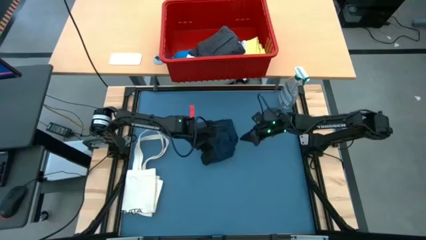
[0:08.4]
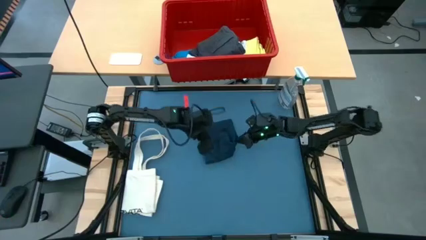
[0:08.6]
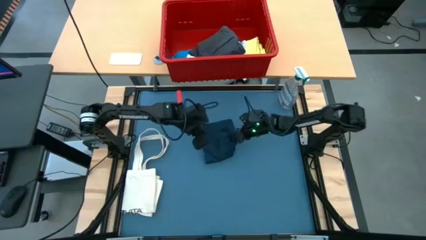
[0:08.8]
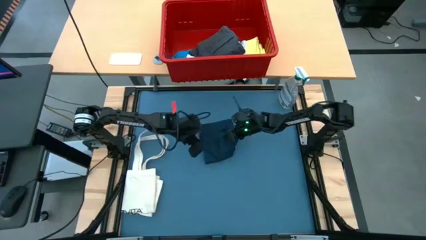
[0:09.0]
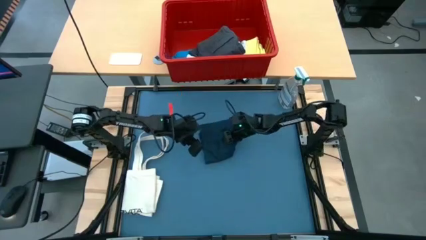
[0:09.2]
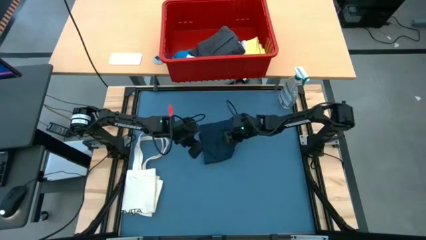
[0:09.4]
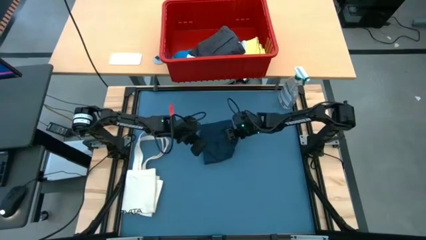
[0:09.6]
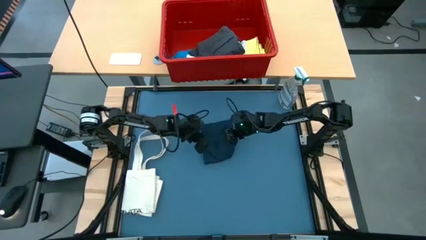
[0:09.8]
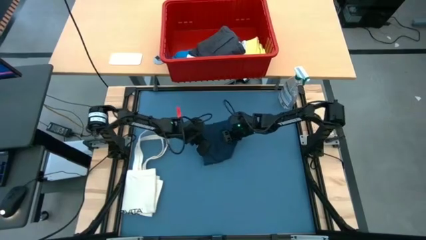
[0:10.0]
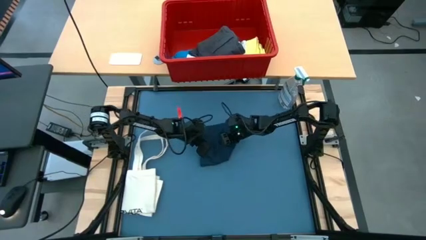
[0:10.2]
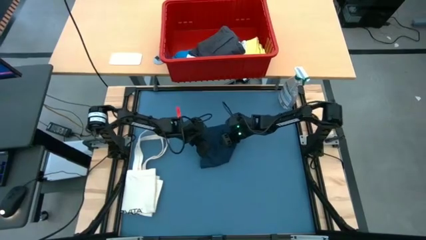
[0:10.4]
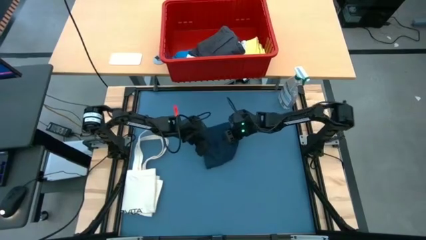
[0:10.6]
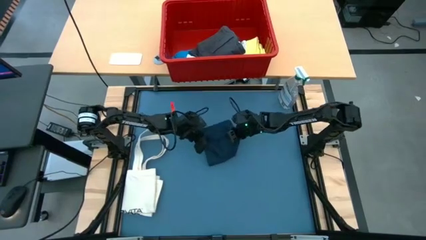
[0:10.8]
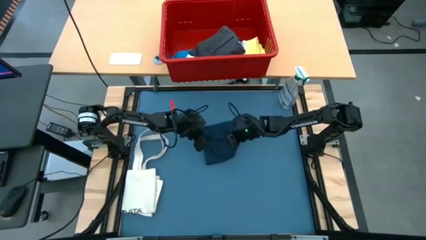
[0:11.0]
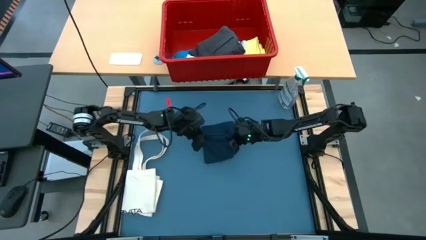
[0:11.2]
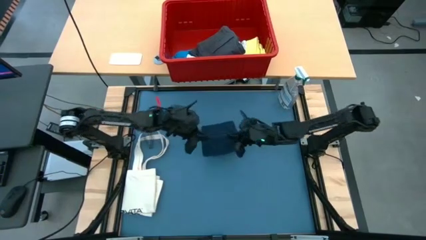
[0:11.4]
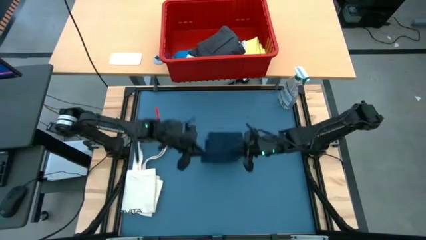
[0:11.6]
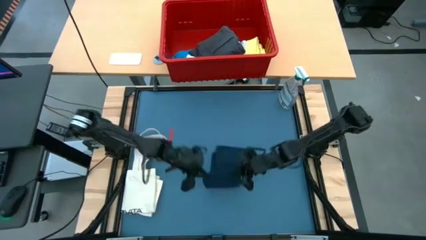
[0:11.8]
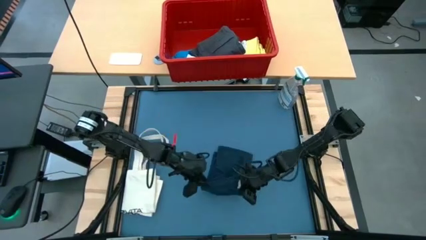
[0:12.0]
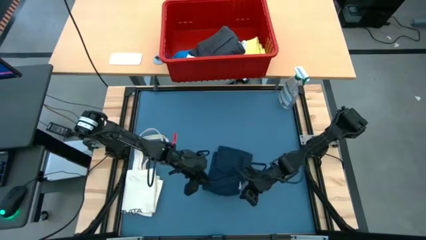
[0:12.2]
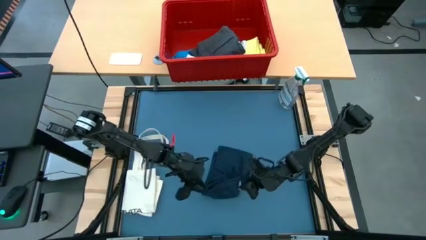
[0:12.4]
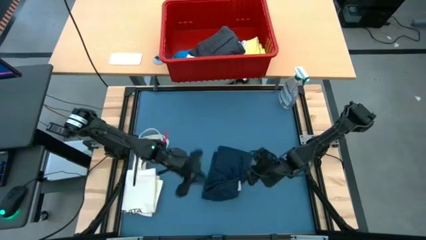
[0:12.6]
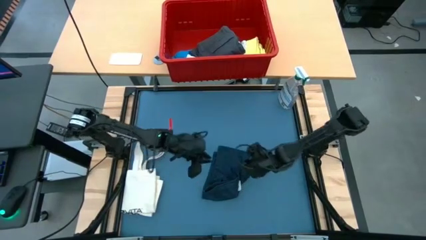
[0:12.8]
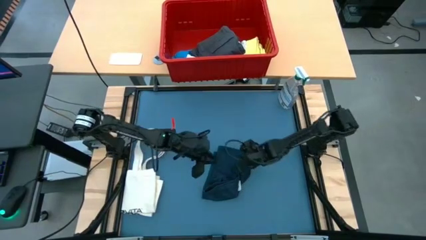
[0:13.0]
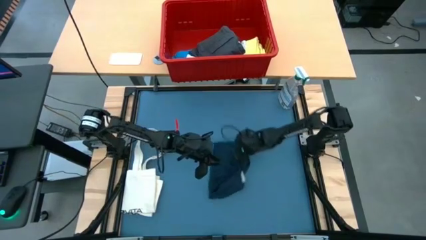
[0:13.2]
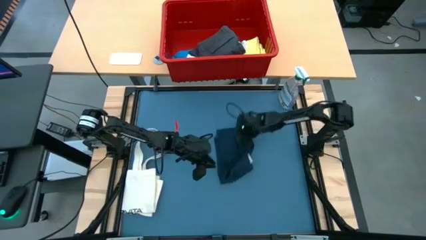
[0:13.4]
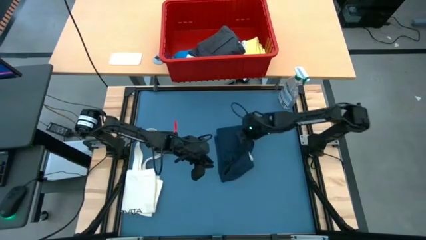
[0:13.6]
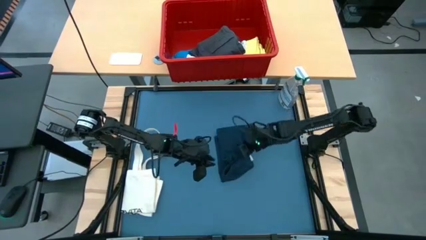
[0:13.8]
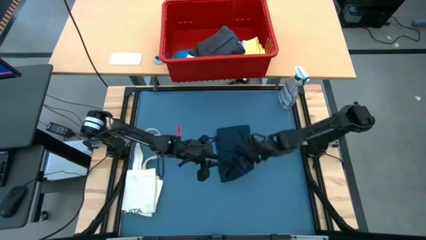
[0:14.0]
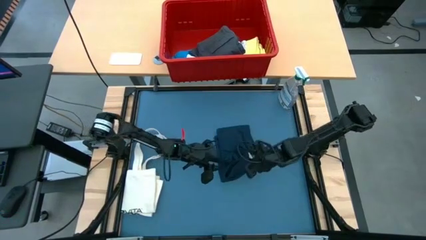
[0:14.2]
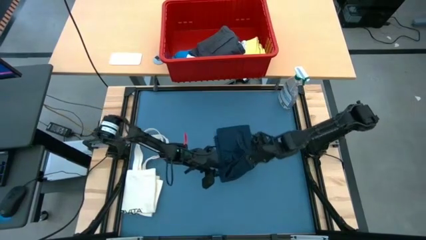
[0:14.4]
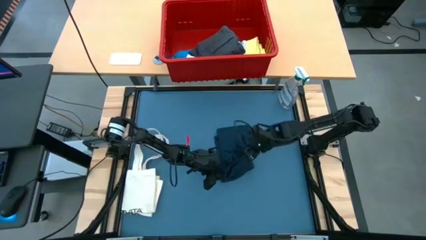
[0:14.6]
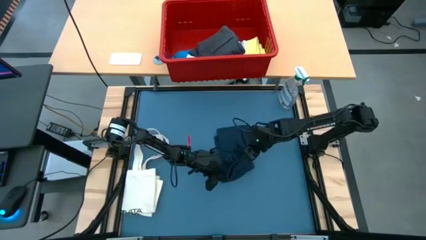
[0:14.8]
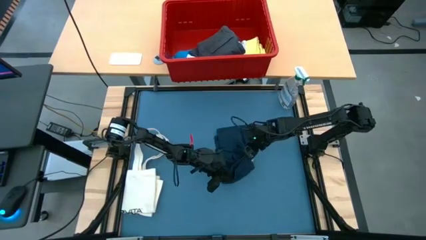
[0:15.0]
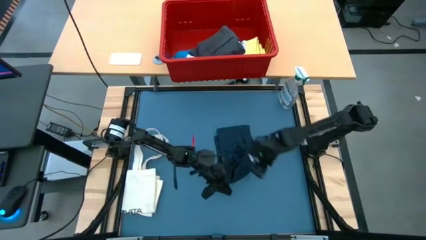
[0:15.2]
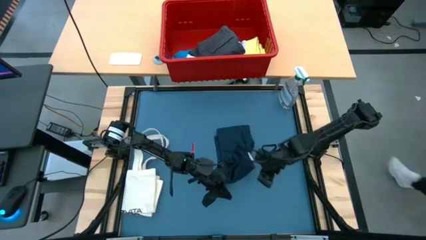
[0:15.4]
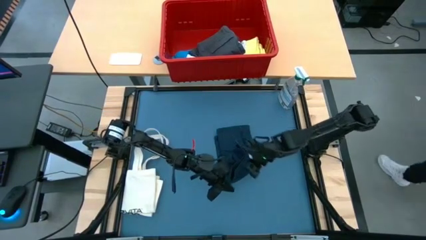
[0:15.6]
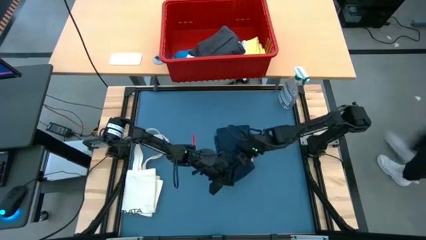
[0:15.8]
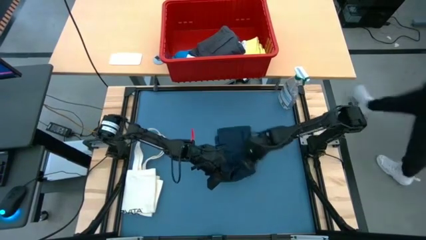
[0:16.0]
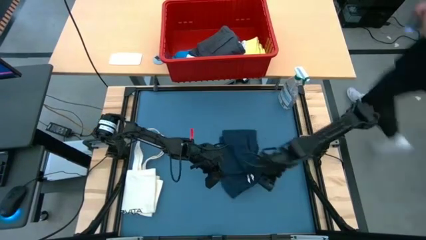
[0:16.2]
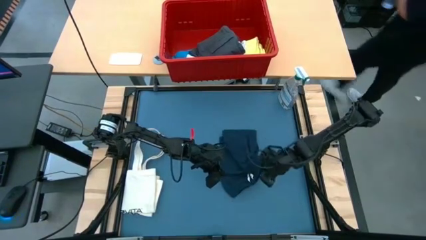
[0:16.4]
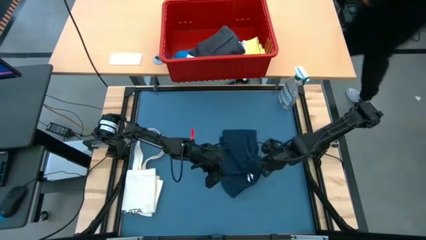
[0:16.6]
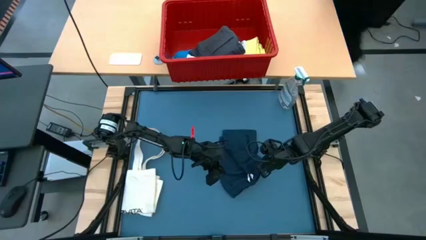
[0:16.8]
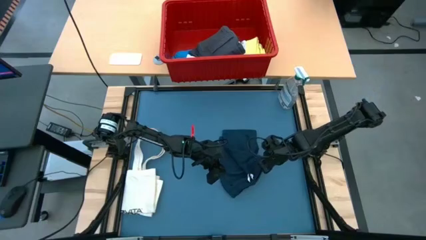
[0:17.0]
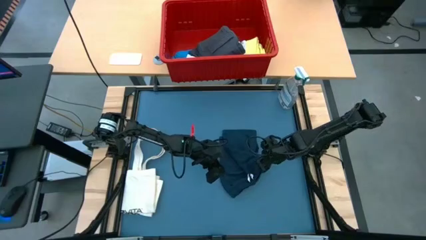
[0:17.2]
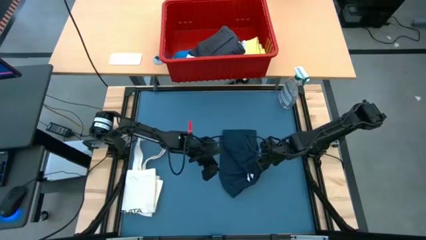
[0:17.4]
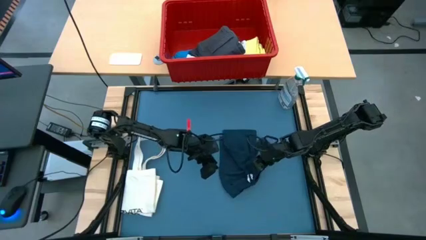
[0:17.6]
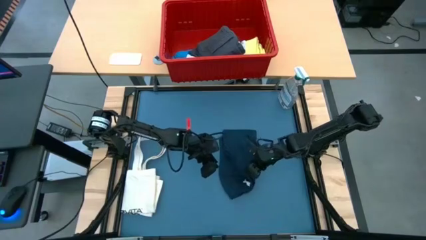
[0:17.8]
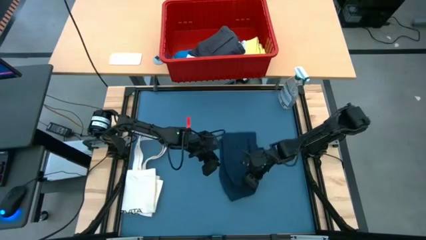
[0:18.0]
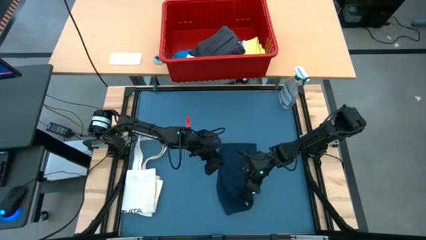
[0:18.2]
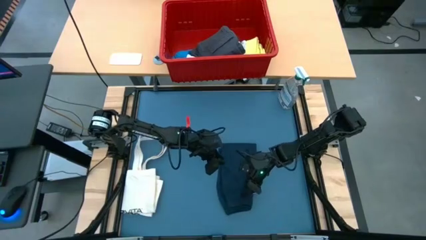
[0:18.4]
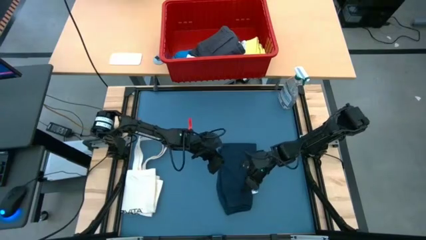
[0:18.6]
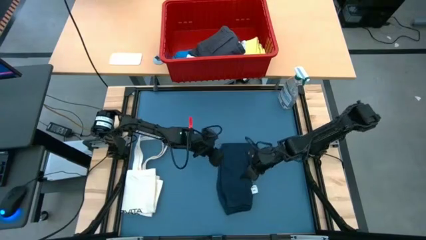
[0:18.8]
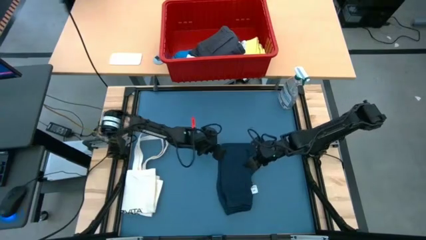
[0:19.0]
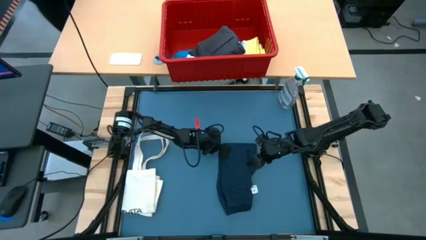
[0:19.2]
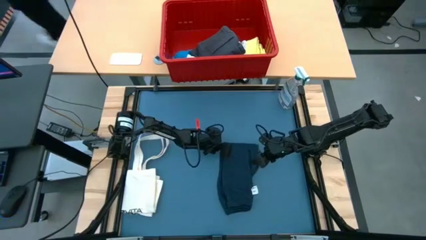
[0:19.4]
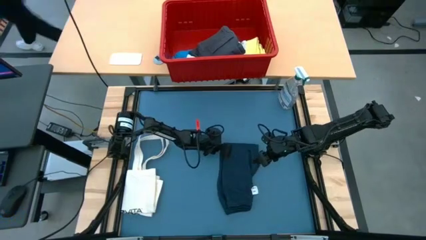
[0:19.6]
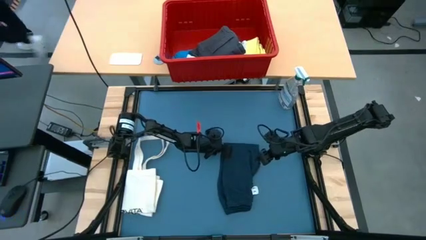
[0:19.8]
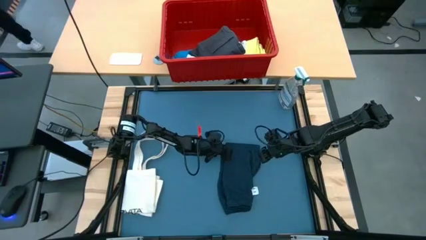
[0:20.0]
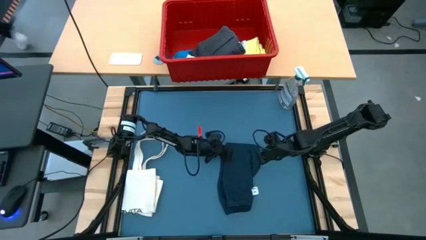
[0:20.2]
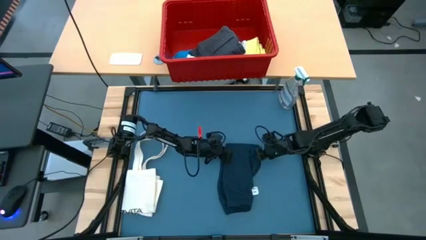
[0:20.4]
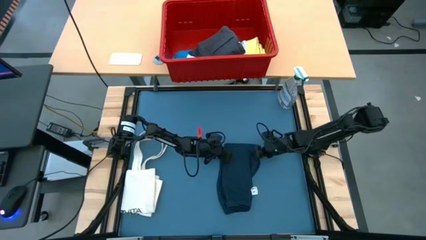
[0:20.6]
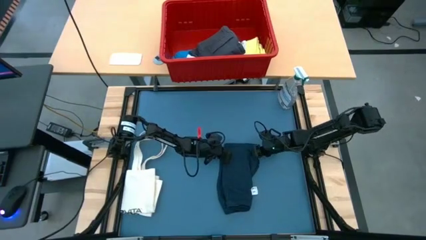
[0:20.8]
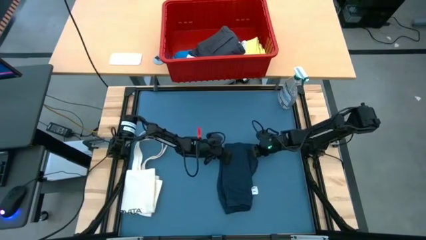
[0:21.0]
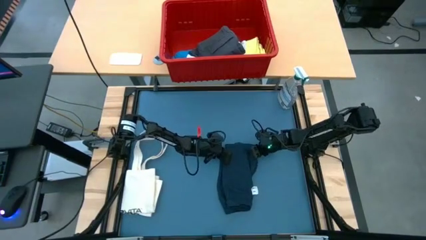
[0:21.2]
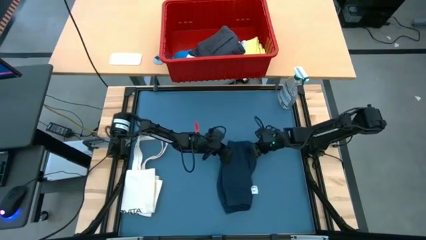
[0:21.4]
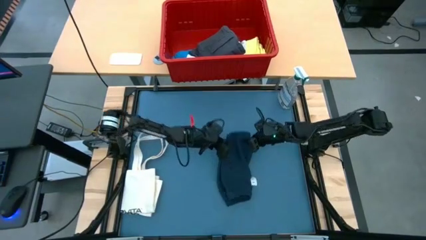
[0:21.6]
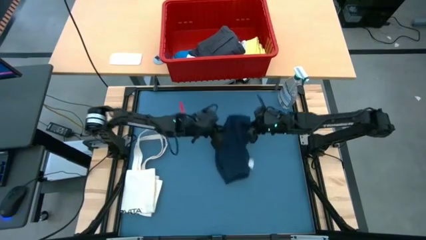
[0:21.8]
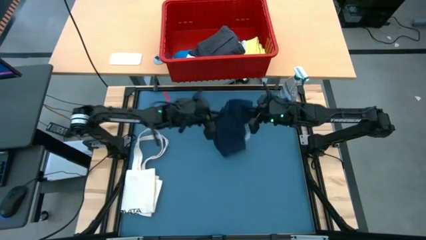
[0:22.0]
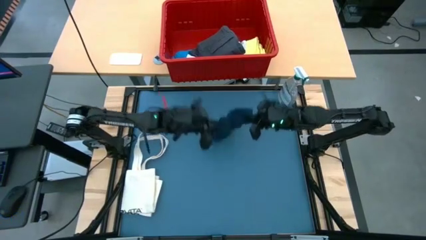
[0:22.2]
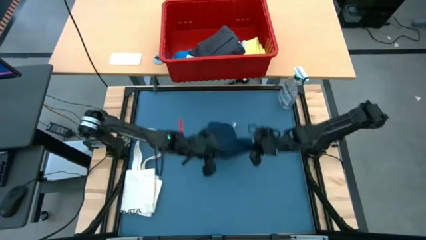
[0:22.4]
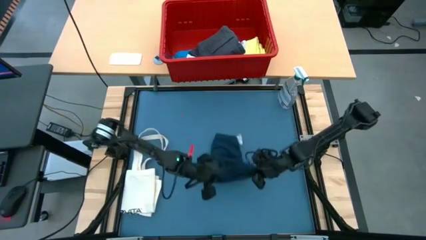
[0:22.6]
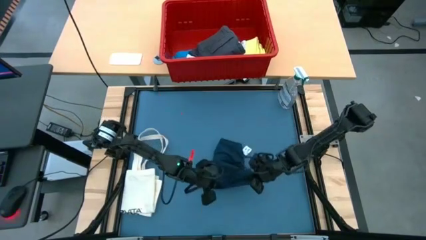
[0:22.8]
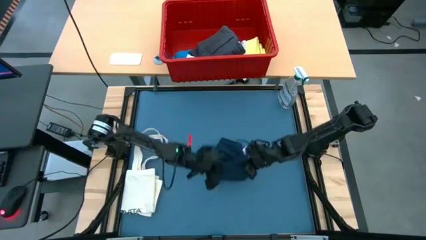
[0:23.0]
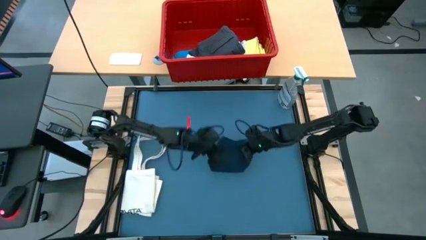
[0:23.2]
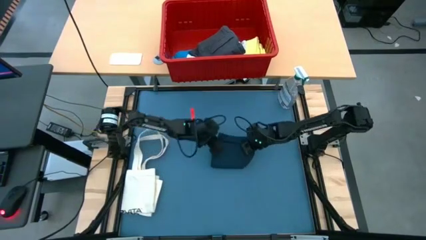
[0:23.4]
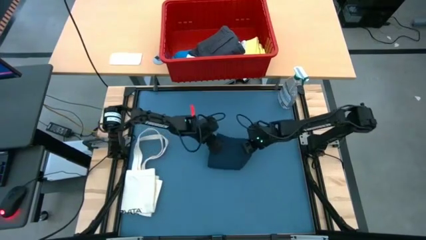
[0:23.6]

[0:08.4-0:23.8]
Task: Fold Laundry from Bin
Fold the dark blue shorts

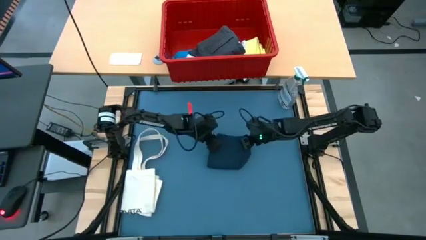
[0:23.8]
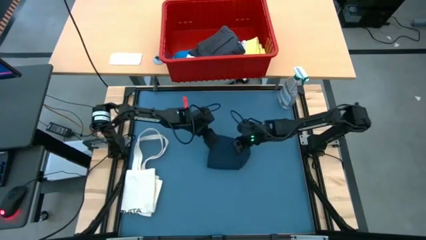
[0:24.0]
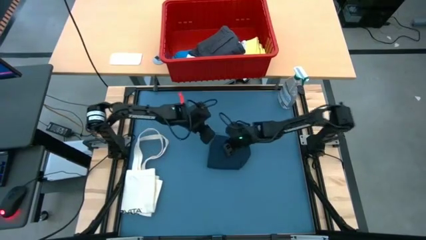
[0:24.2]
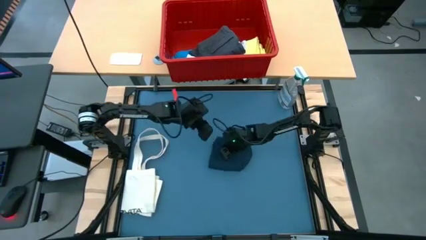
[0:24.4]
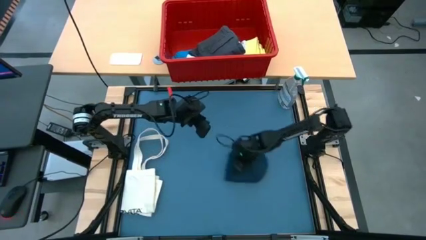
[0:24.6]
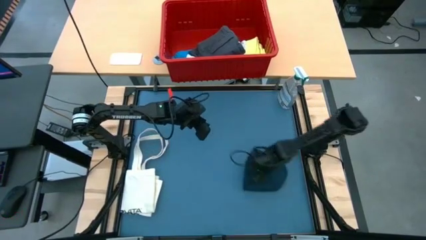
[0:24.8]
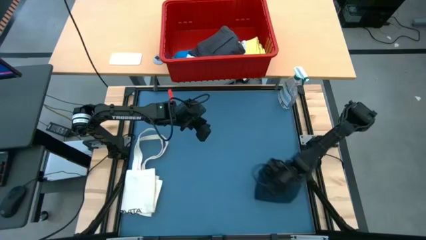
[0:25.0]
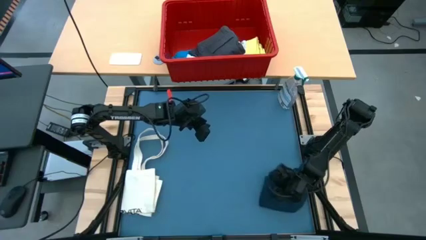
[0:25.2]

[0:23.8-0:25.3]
Move the folded dark blue shorts to the bottom right of the table
